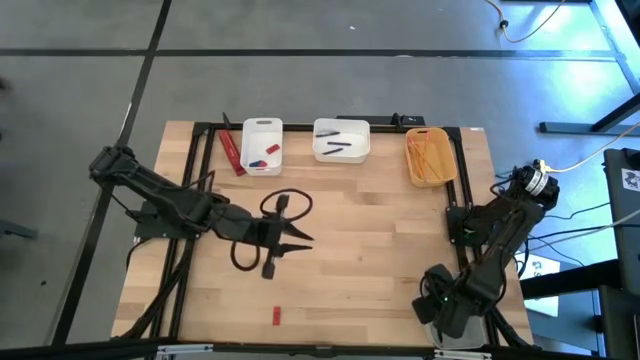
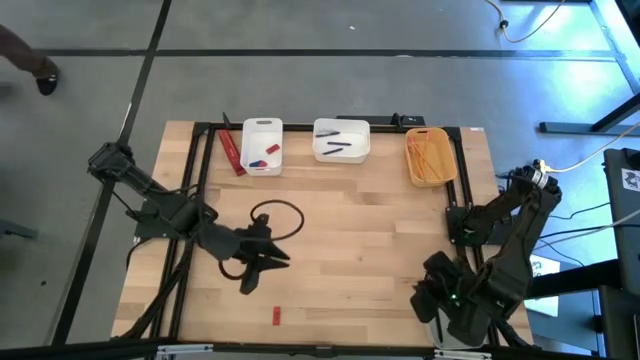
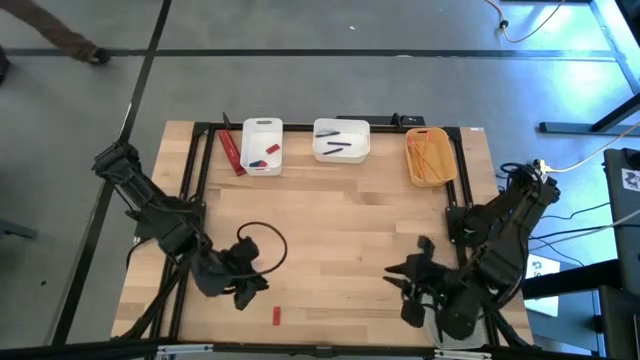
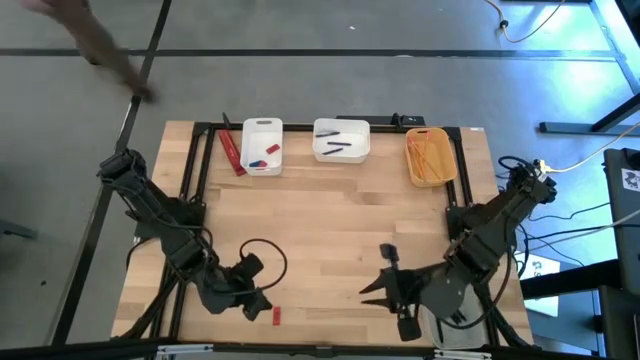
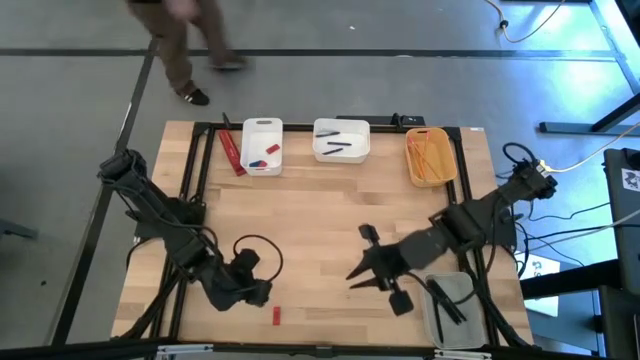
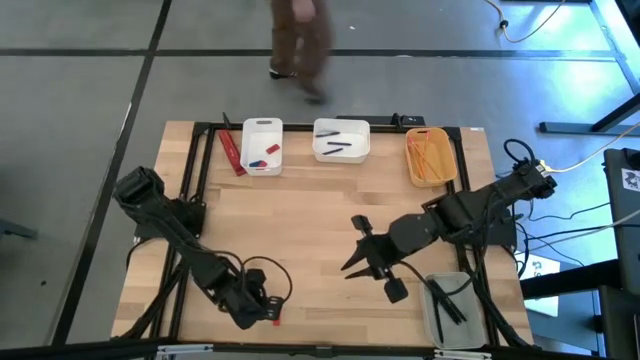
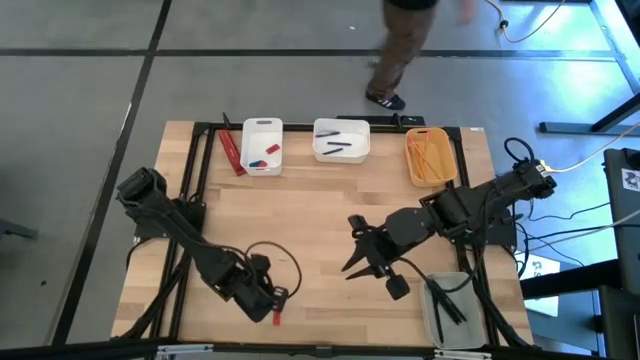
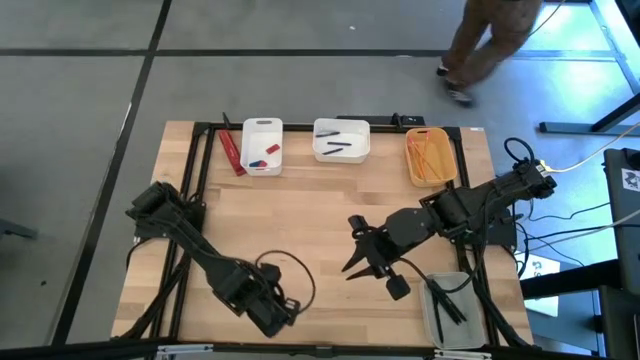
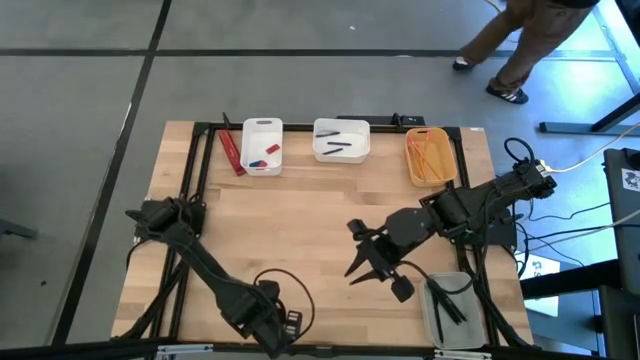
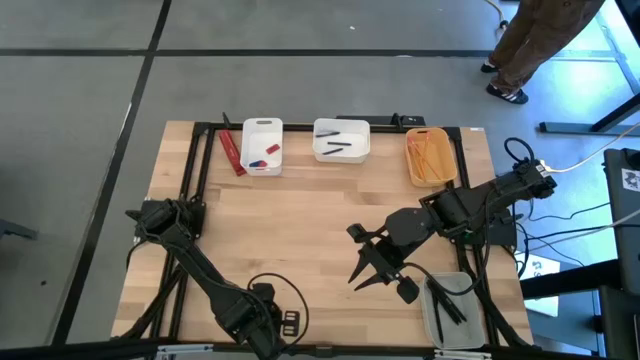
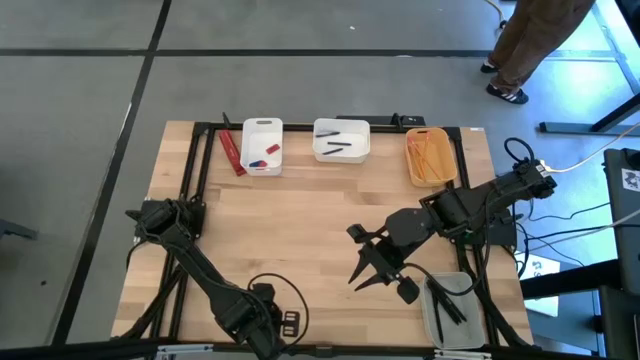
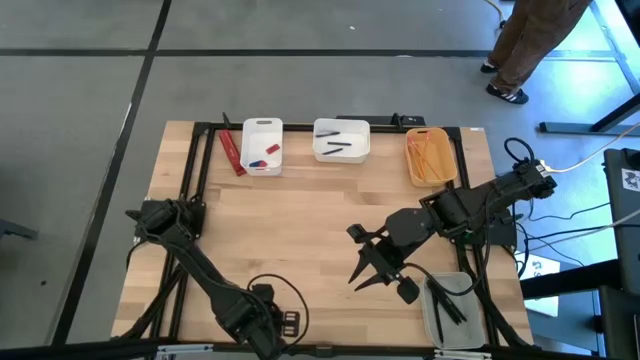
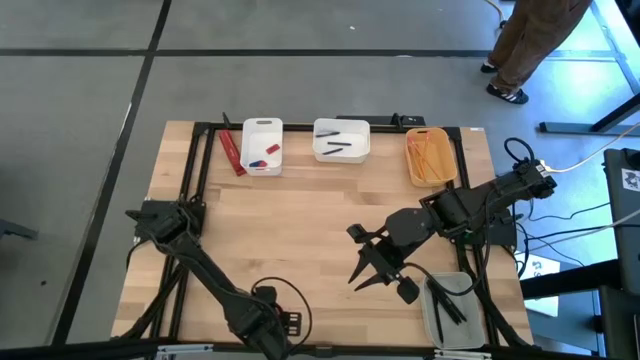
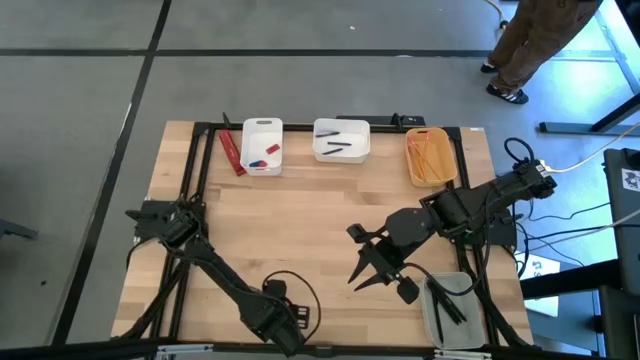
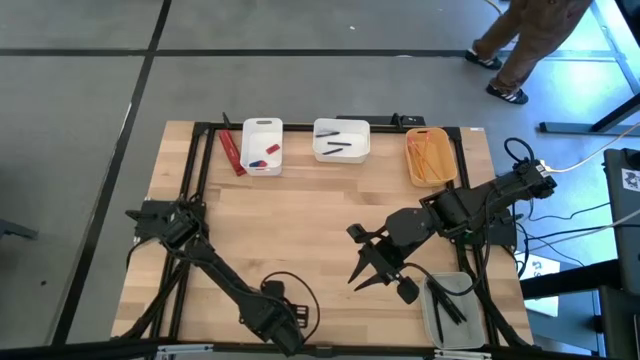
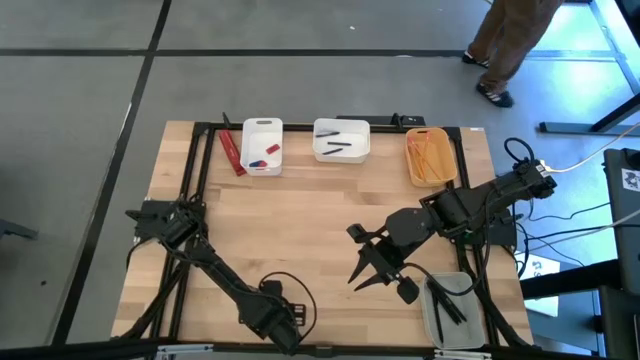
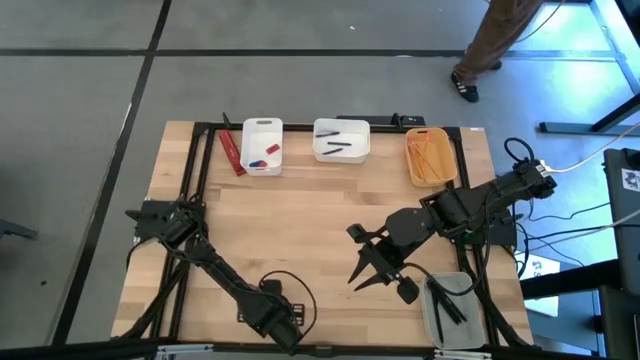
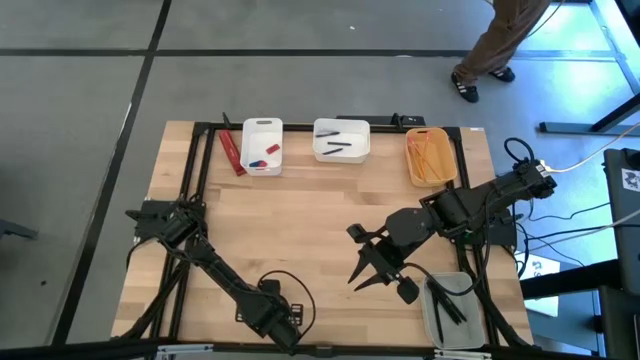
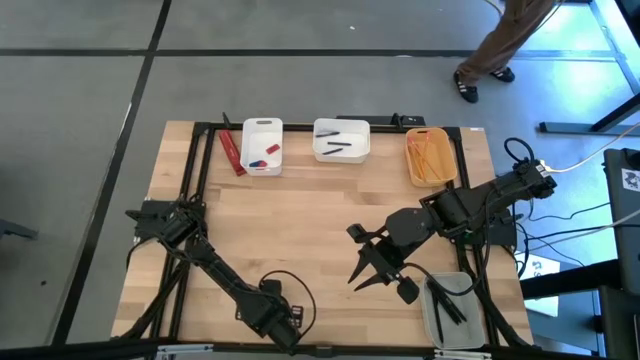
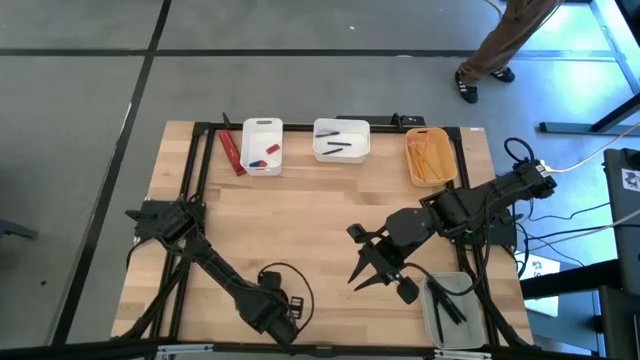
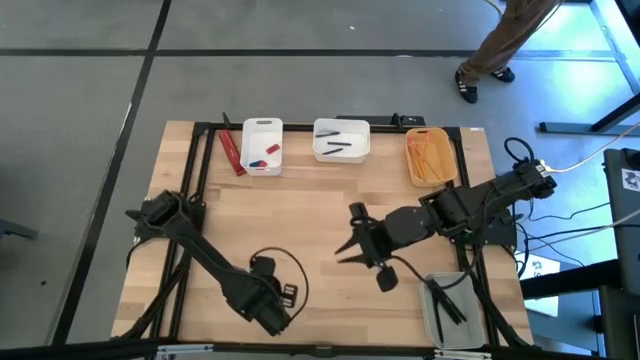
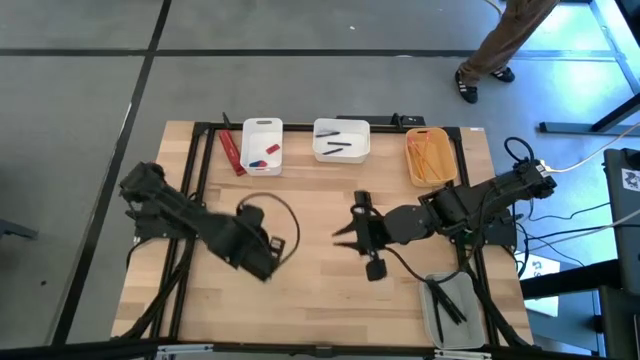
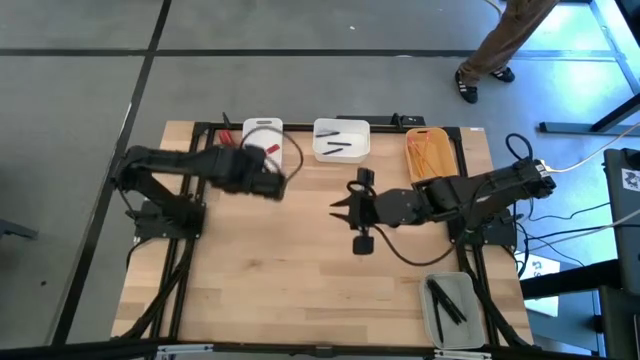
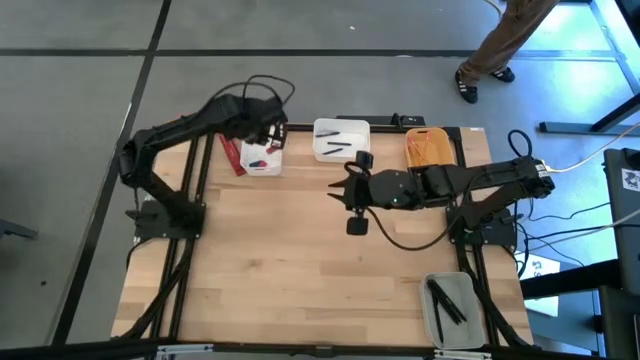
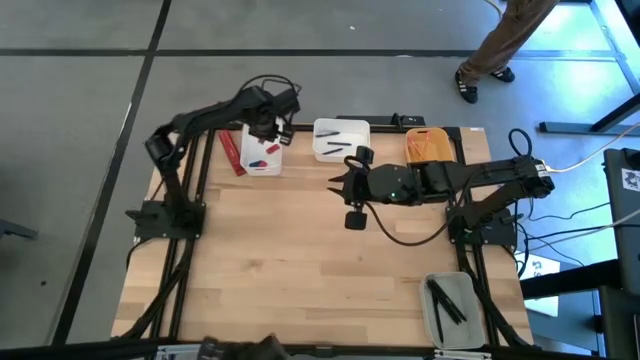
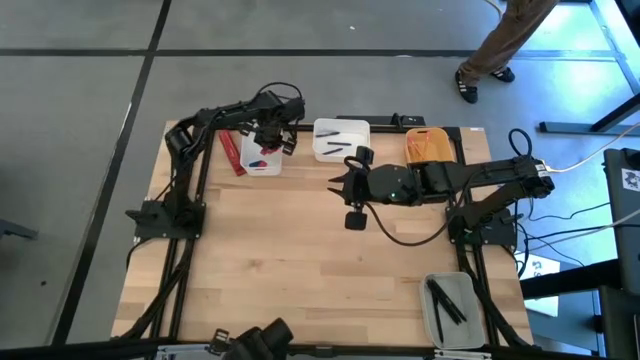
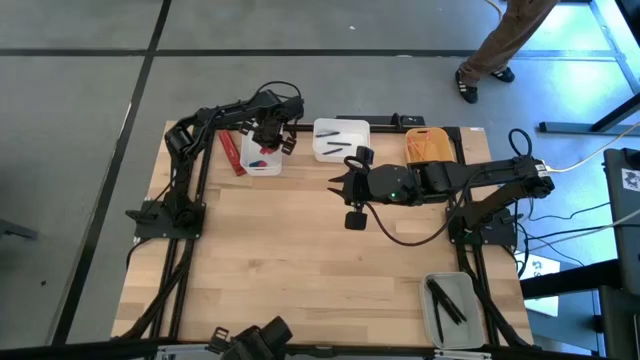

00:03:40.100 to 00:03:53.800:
Task: Sort crayons/erasers/pens/pencils in bins
Put the red eraser into the left white bin

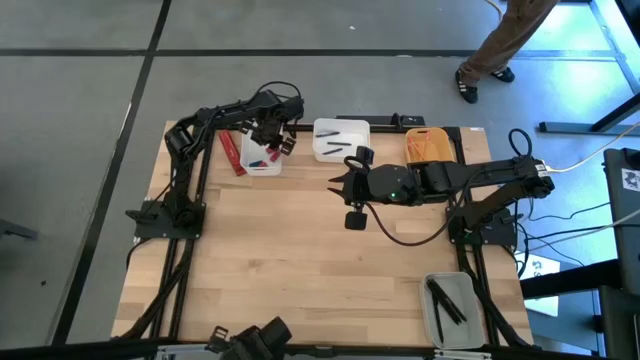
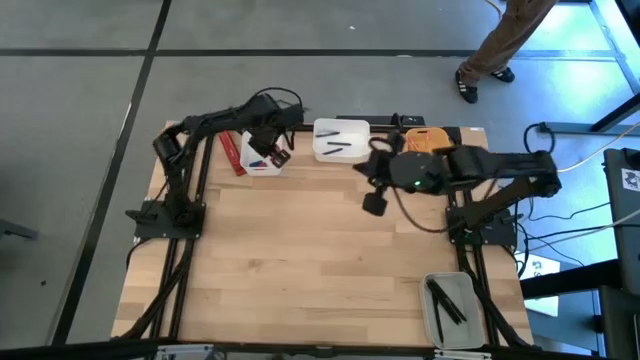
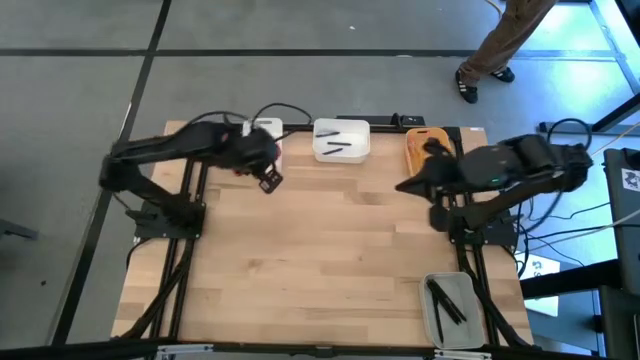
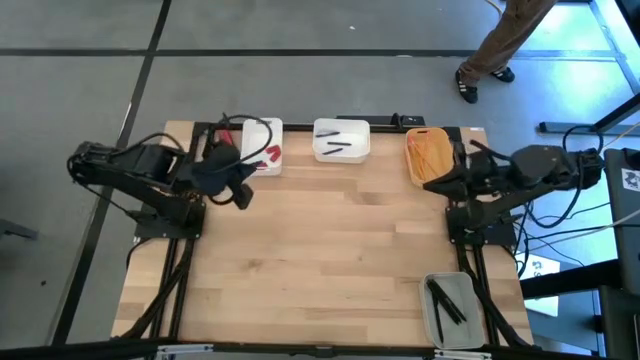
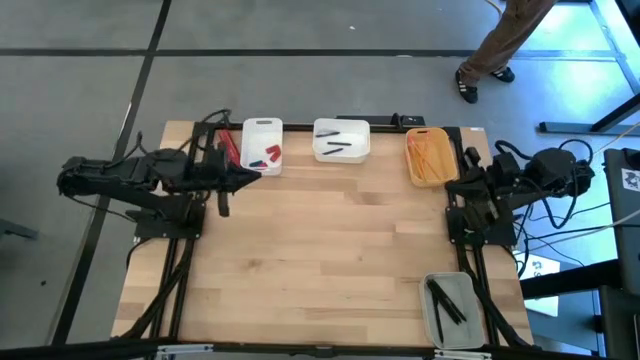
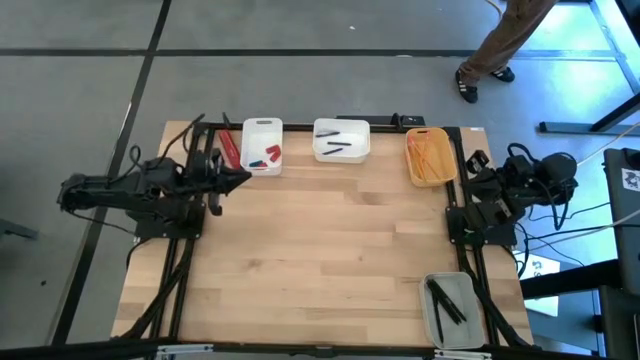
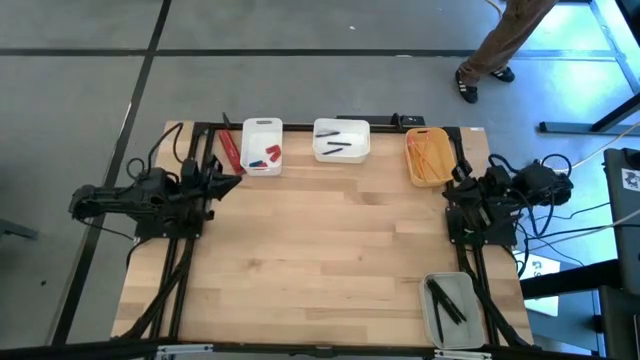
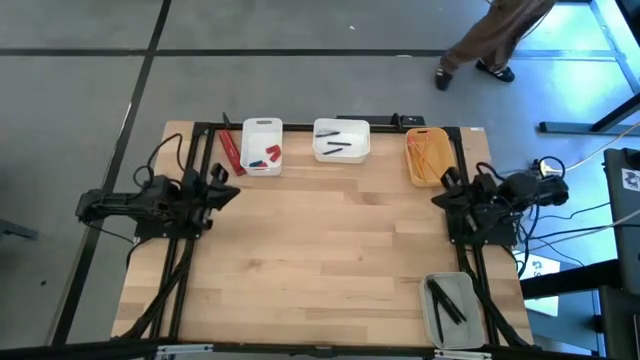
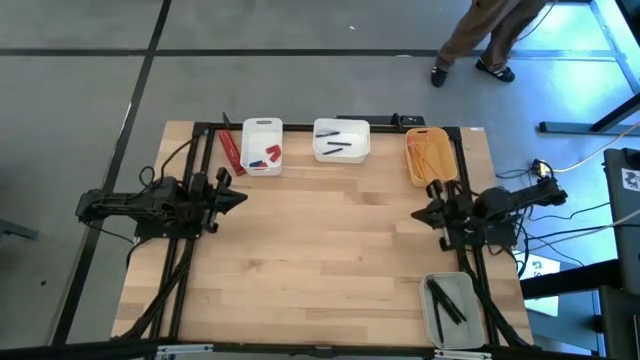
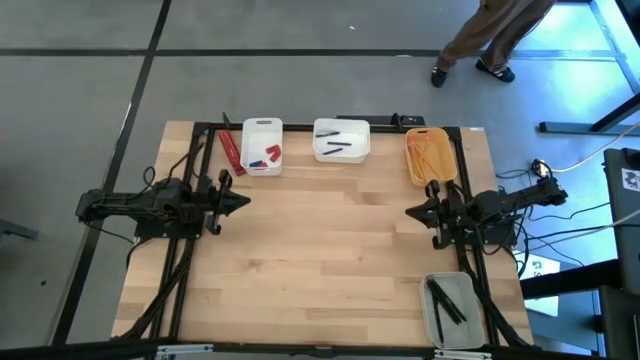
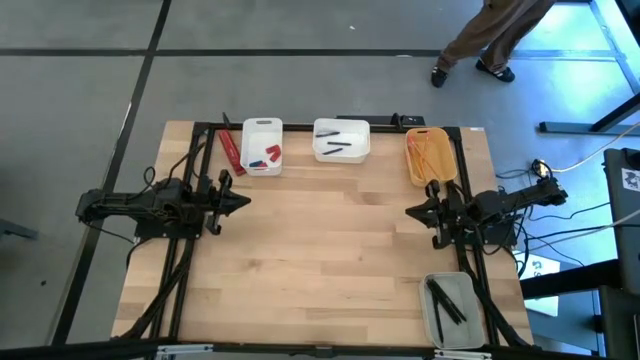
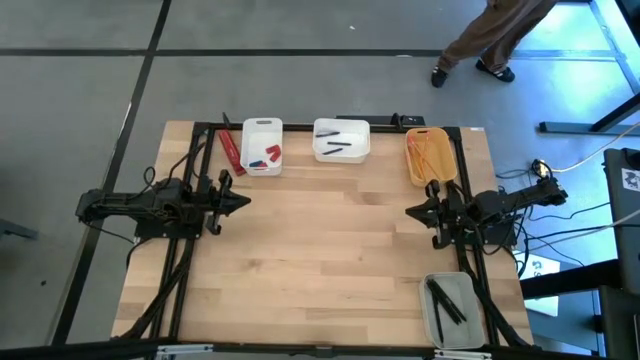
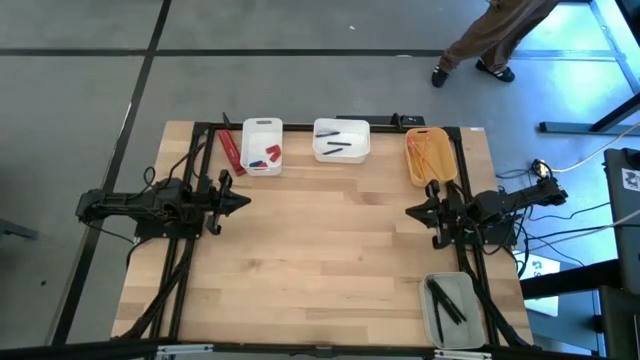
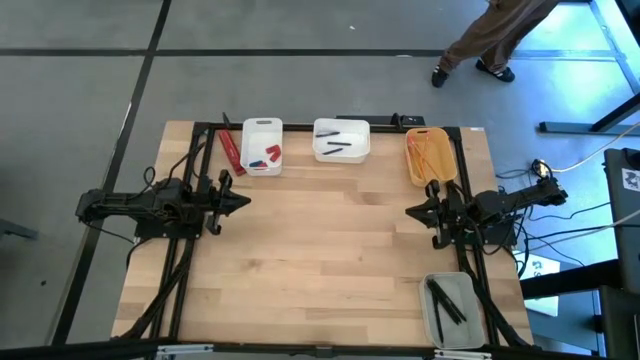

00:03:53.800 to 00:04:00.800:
Return to Home Position

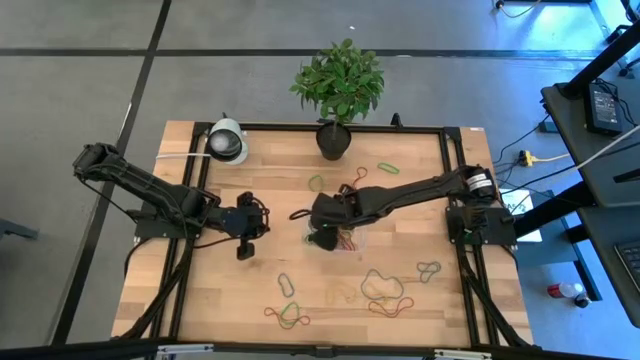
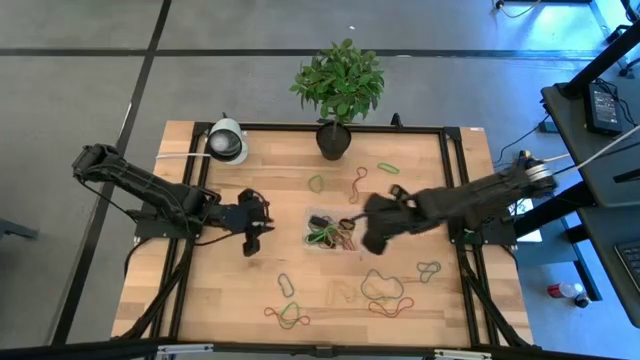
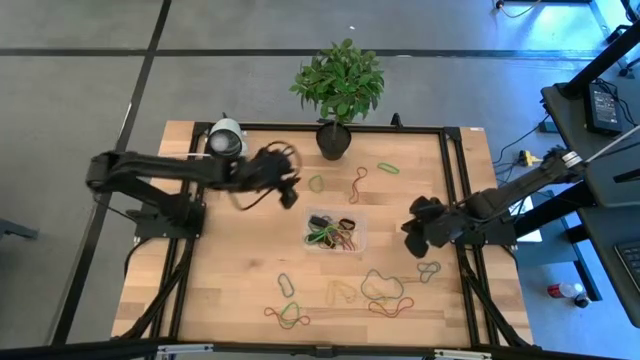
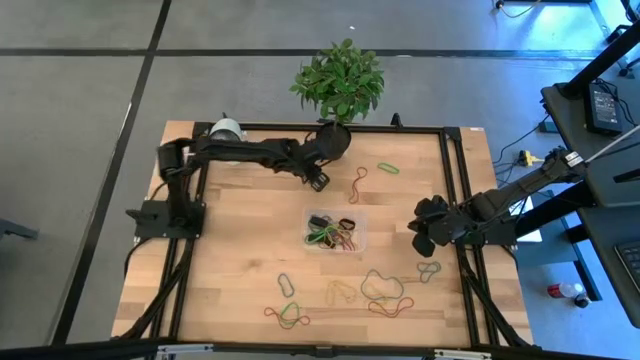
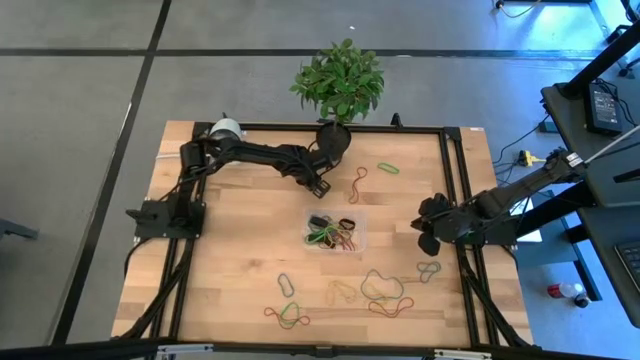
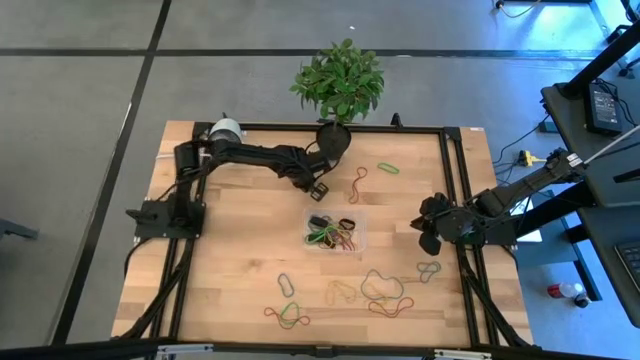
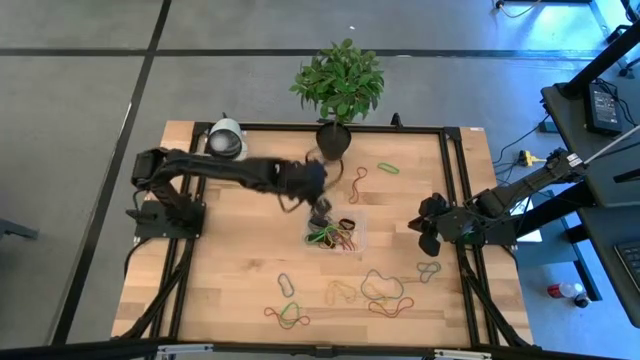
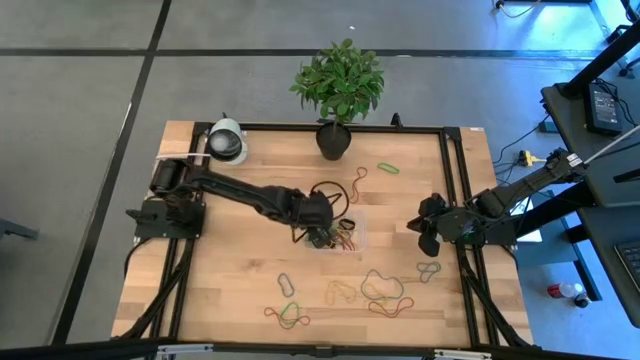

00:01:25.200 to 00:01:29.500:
Task: Pick and place rubber bands into bin
Put the green rubber band into the bin
